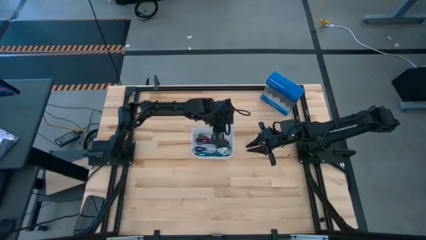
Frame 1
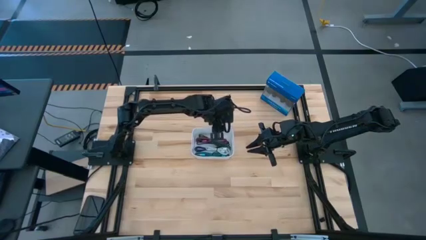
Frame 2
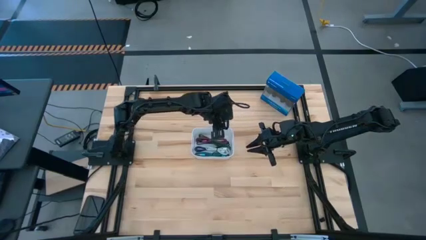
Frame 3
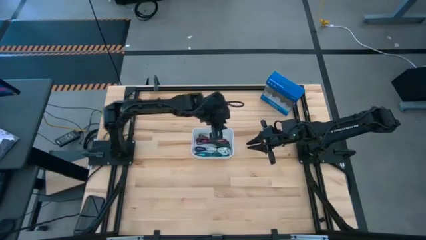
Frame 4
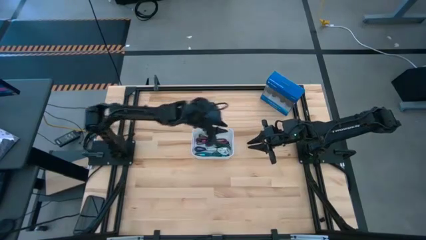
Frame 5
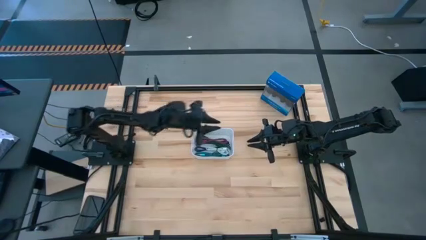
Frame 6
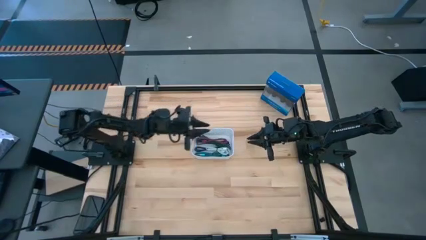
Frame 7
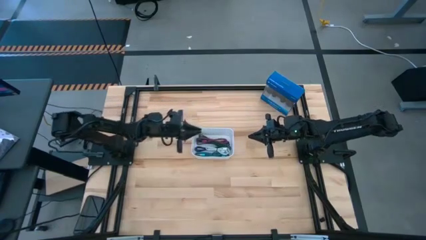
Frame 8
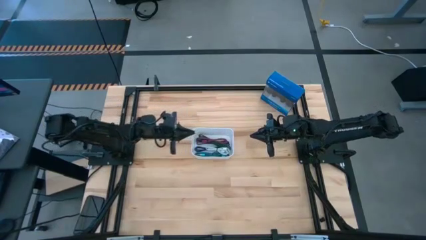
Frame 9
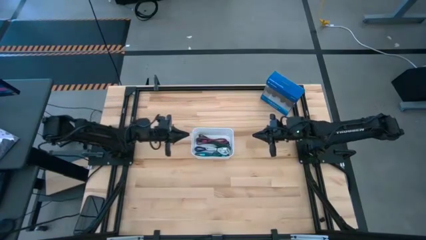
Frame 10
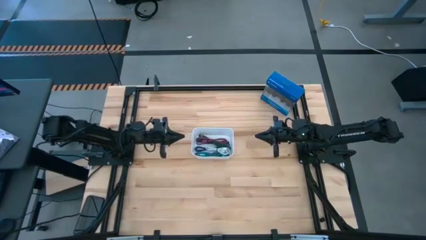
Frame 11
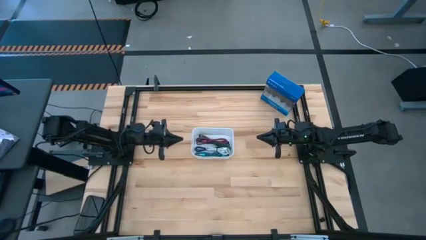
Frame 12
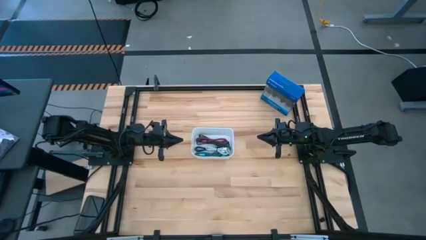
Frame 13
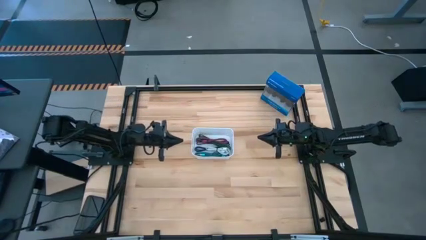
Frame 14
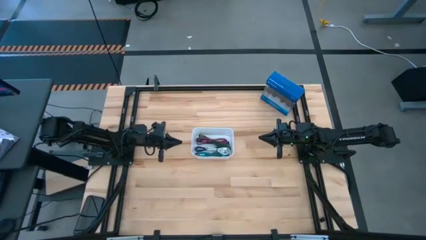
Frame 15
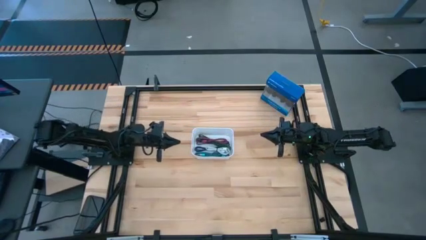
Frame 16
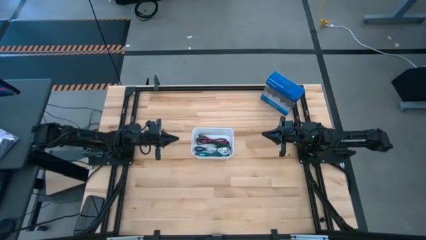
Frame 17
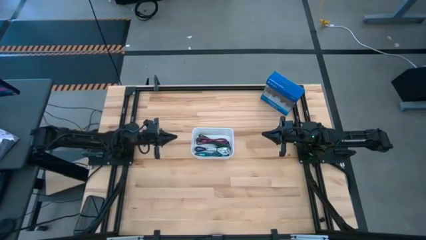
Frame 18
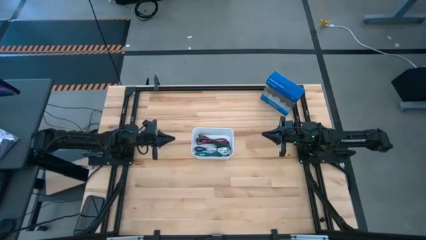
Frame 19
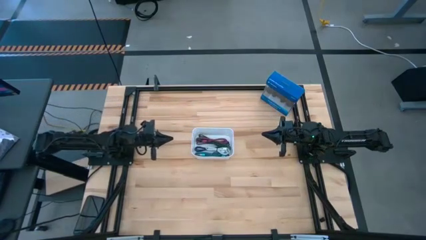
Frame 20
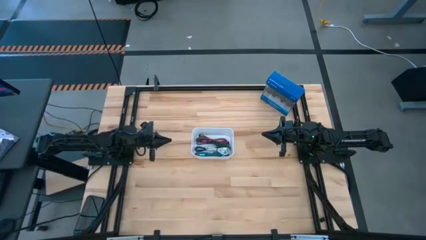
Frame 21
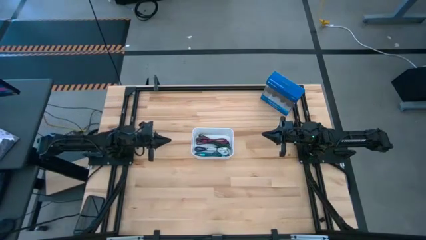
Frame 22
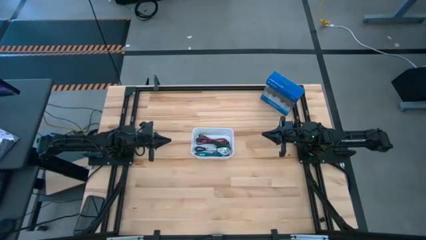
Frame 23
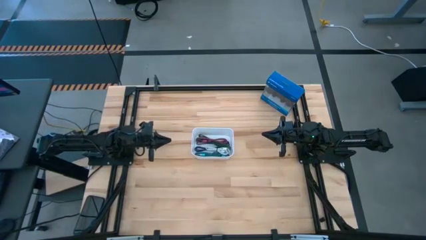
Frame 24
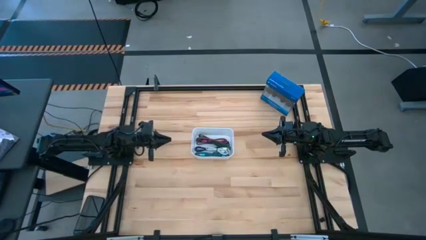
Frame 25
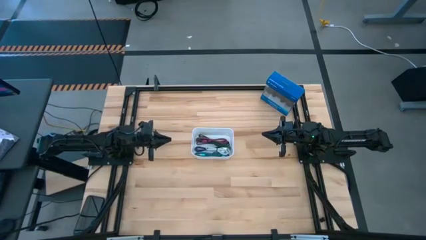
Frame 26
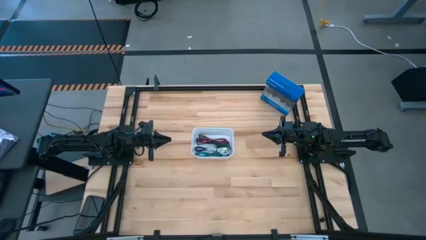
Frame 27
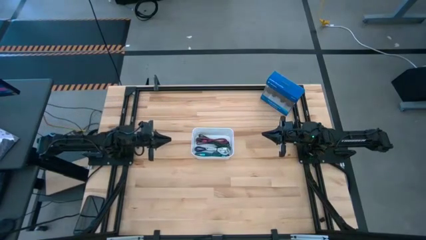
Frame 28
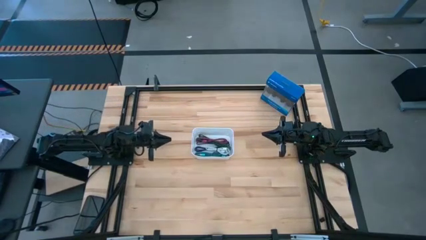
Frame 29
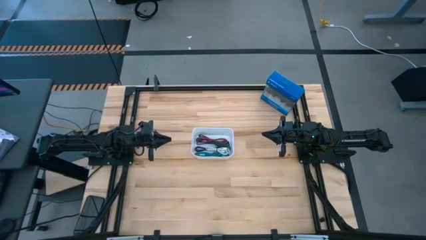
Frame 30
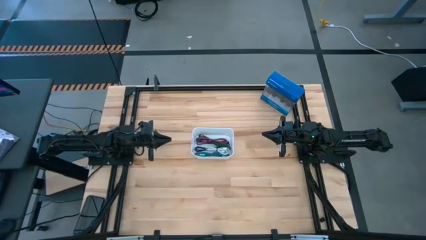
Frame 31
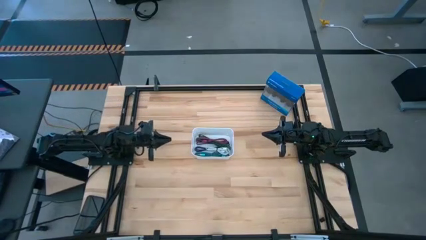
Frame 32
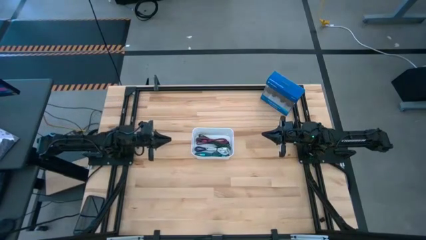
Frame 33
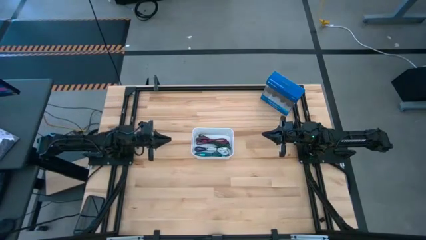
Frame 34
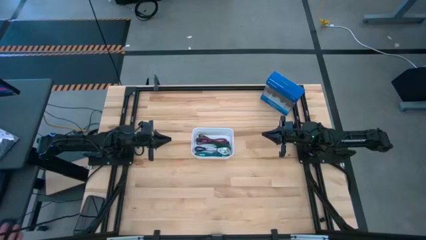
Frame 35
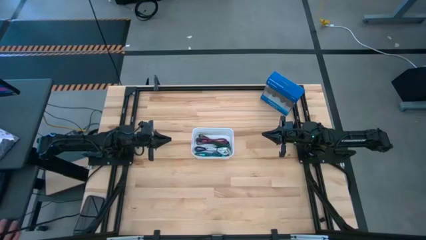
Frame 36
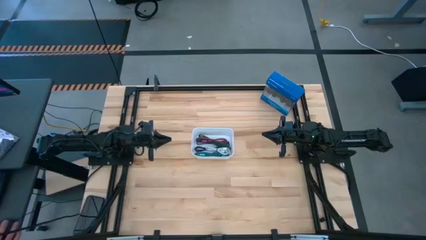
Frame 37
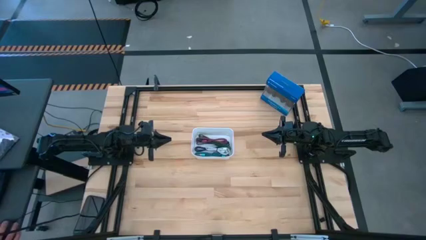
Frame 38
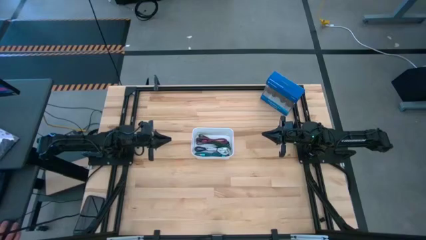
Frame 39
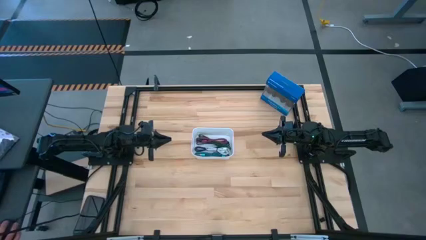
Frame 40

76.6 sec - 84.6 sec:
Task: Pick and place USB-C Cables
Return to Home Position

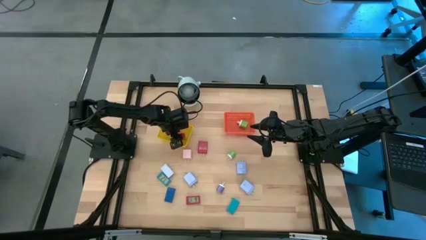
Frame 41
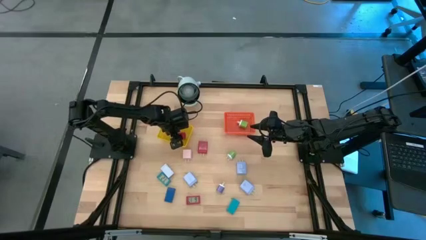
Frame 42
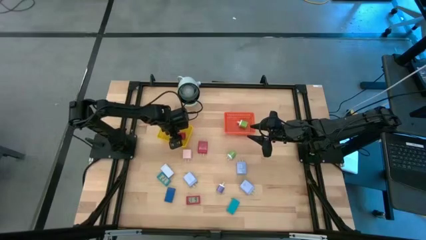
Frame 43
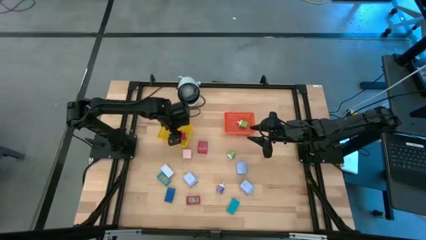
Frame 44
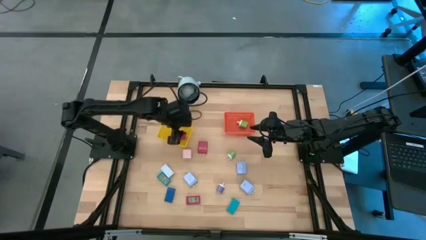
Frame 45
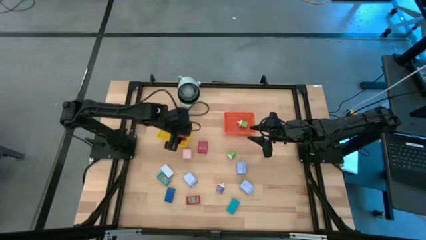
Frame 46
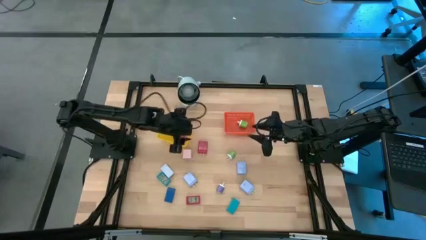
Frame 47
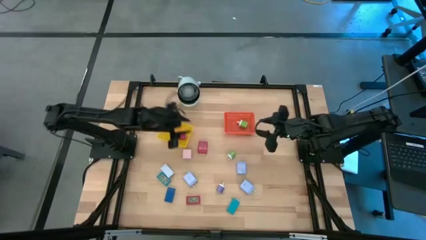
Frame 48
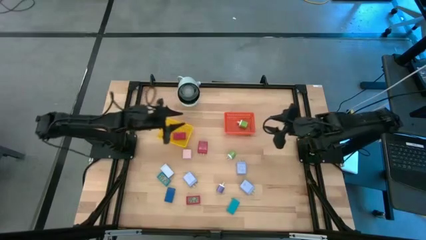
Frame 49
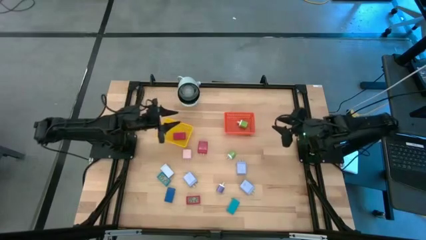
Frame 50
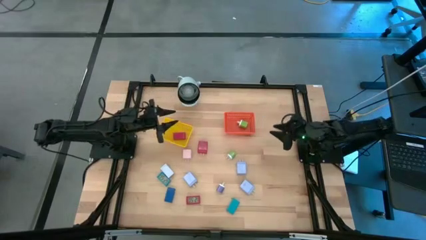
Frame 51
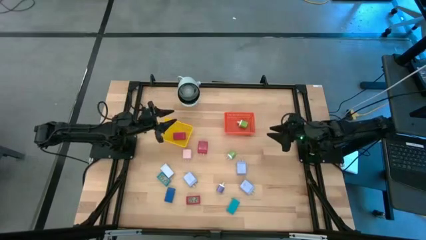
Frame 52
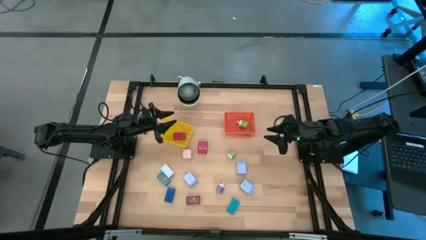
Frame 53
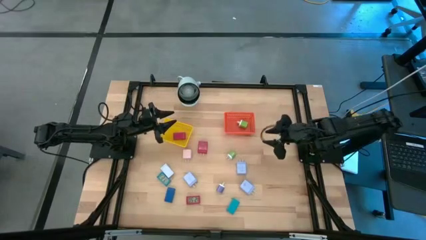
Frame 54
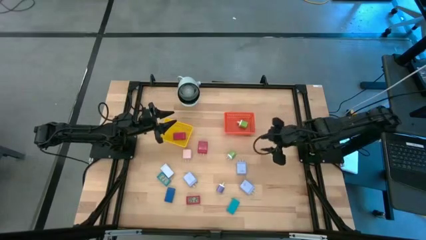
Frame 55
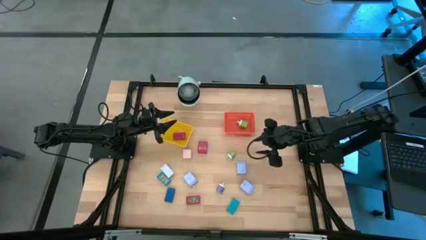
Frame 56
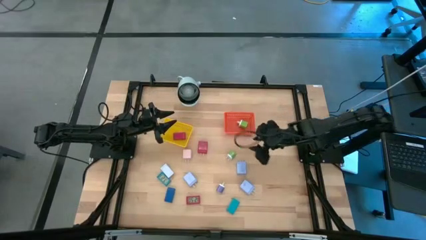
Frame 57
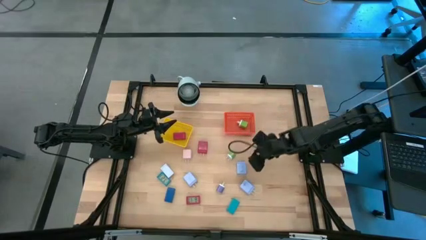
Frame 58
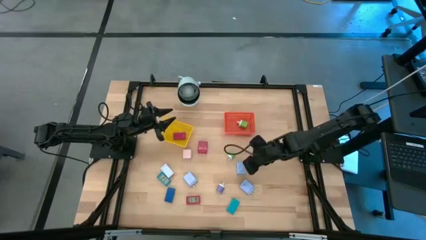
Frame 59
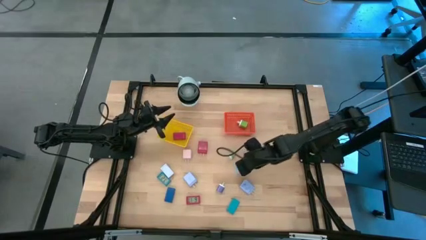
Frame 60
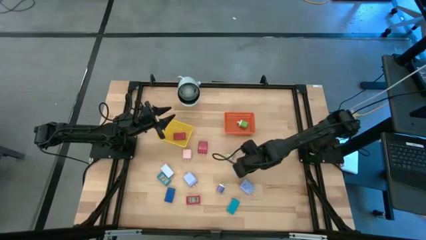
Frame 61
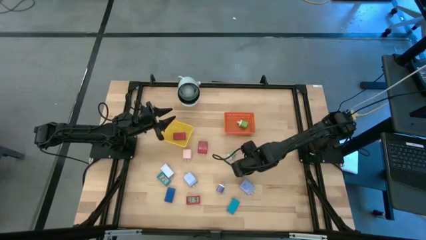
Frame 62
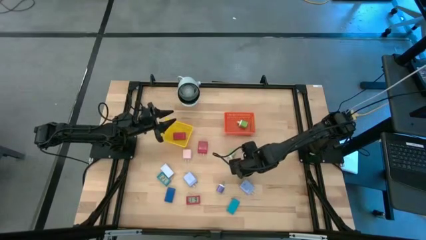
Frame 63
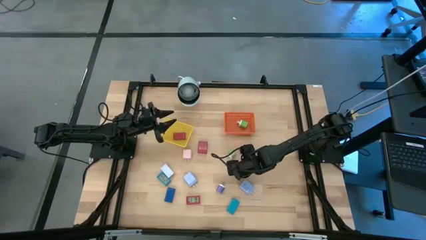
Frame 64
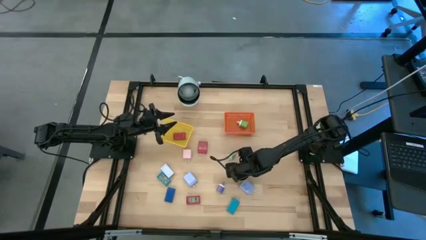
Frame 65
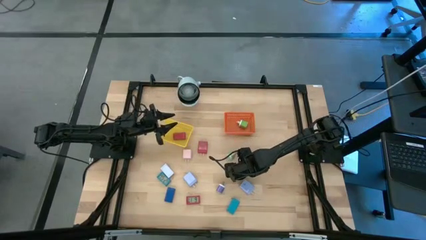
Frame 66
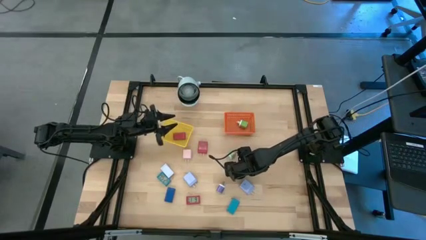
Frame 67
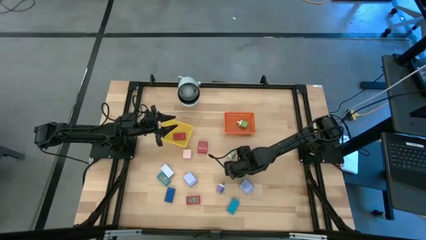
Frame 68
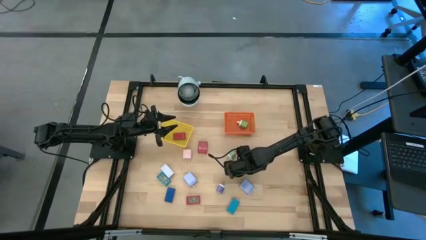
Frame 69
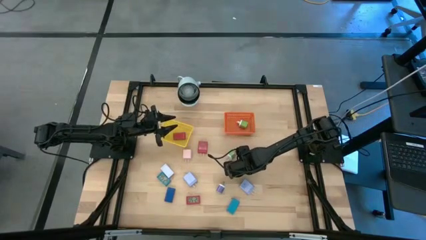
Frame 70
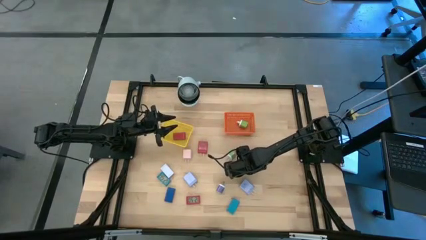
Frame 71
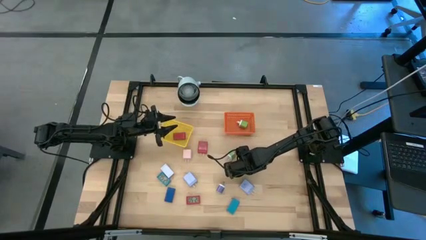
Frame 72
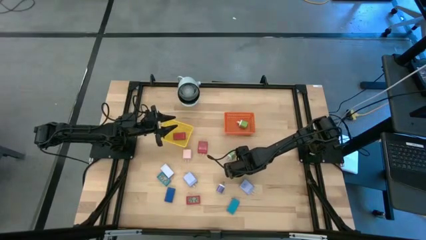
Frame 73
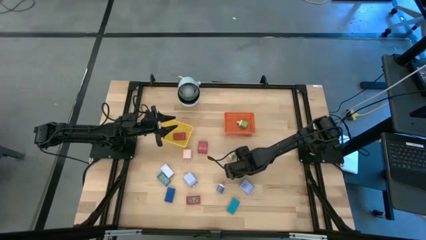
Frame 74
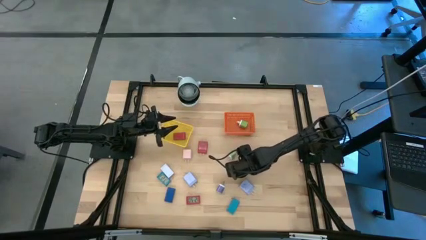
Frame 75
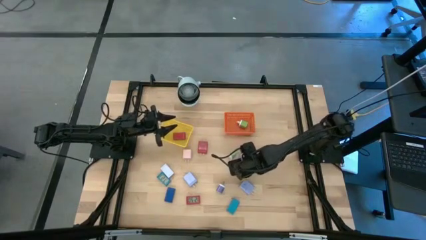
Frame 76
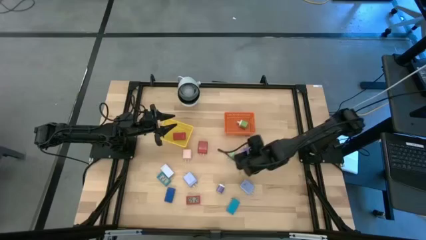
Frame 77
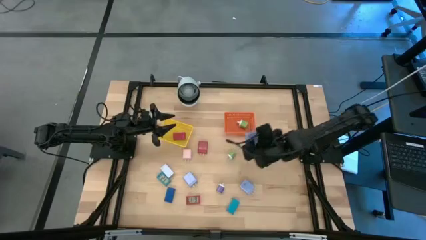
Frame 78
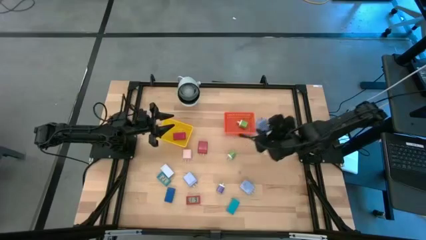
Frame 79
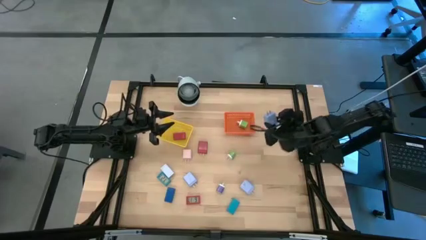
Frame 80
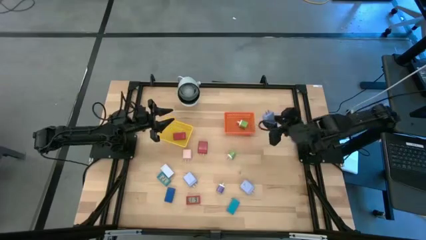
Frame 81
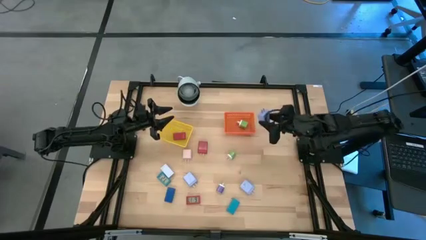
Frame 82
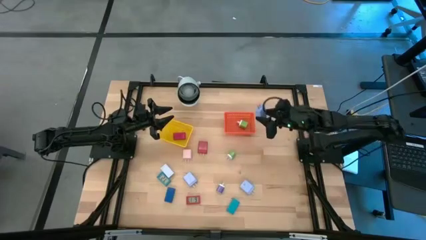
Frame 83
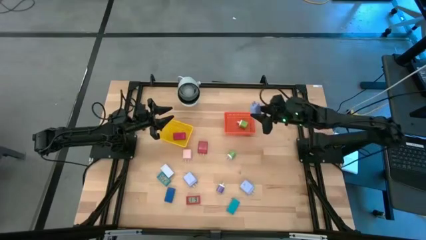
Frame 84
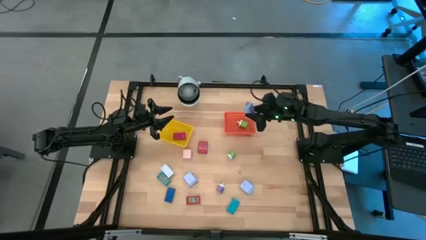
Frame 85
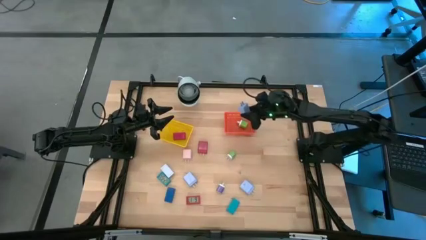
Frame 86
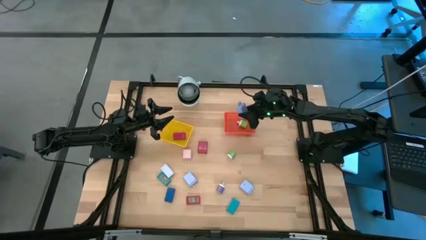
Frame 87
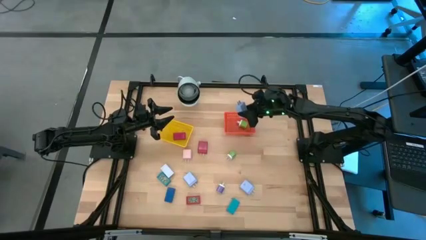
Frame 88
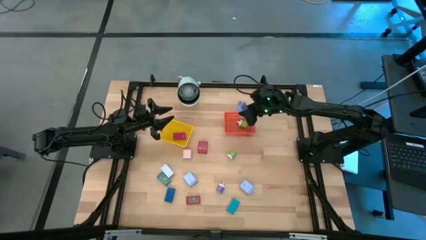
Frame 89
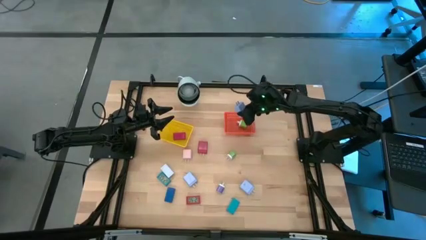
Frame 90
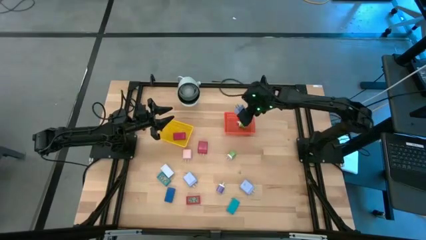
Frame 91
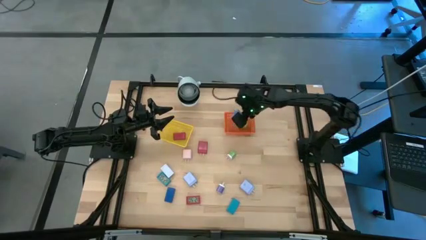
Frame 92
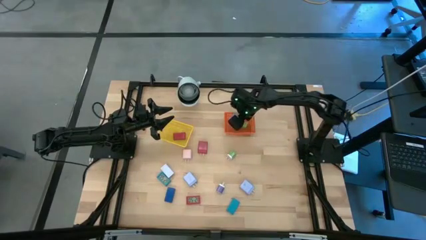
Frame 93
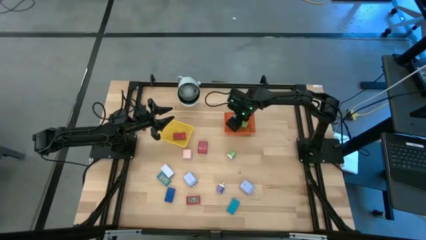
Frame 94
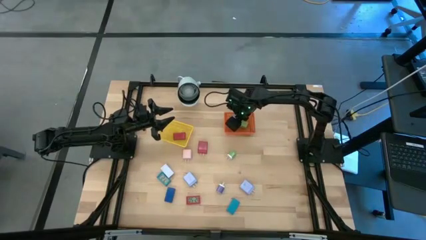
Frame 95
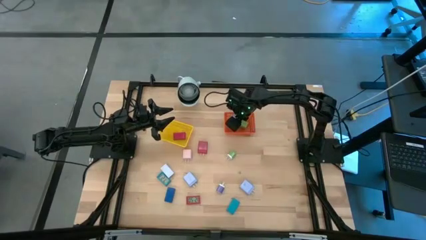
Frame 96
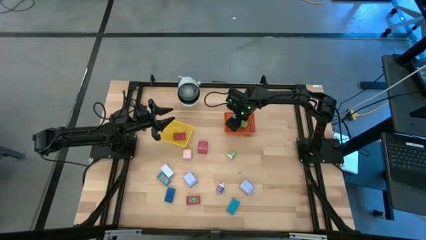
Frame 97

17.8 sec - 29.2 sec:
Task: Pick & Place Office items
Put the top light blue charger adapter into the orange bin
